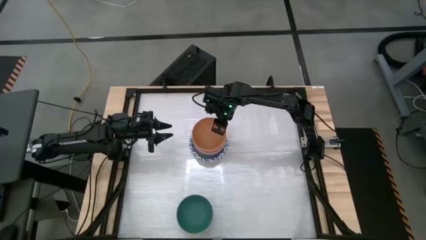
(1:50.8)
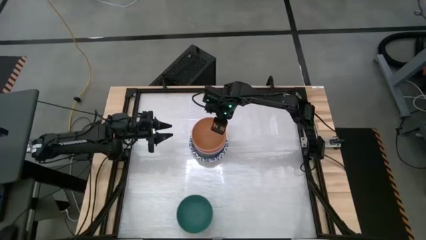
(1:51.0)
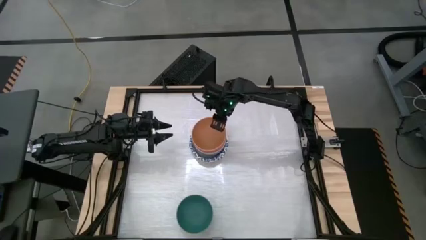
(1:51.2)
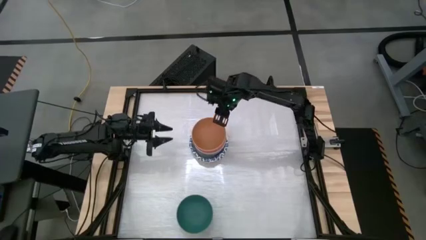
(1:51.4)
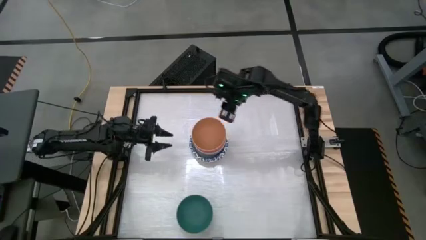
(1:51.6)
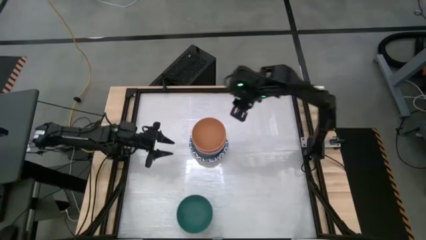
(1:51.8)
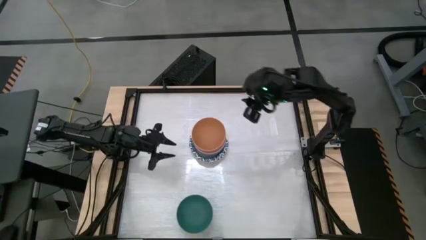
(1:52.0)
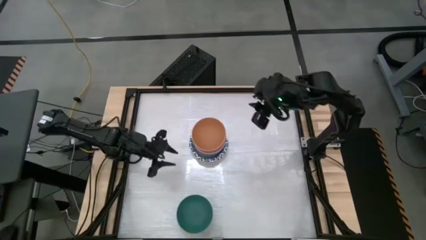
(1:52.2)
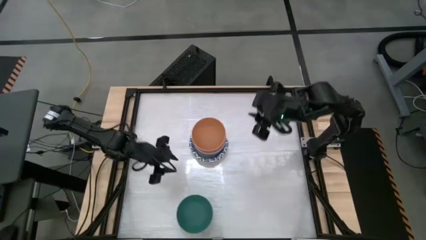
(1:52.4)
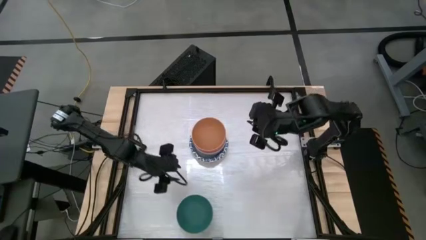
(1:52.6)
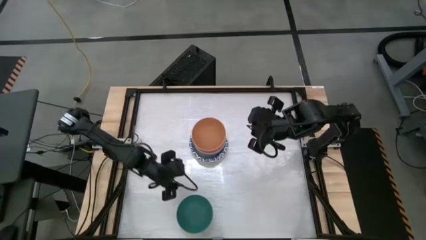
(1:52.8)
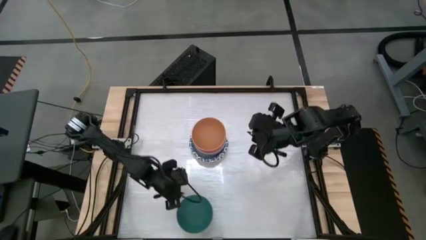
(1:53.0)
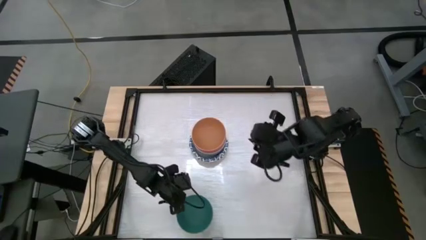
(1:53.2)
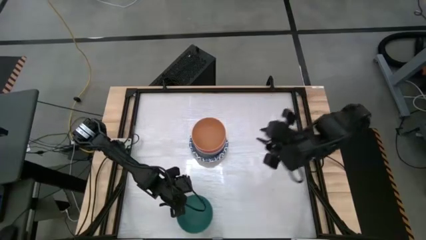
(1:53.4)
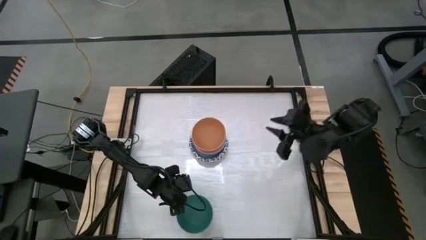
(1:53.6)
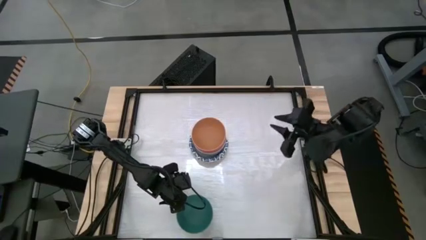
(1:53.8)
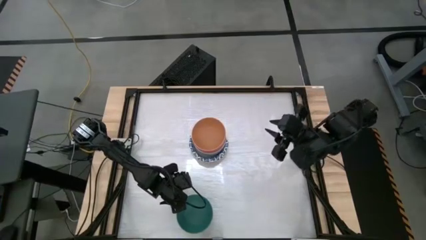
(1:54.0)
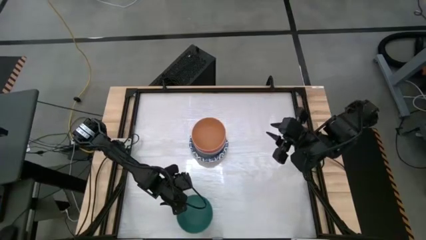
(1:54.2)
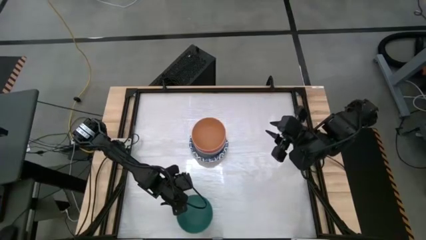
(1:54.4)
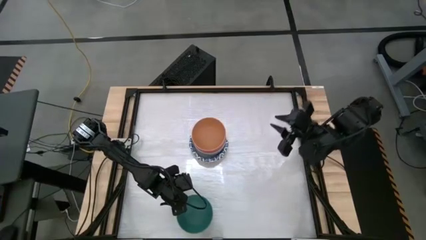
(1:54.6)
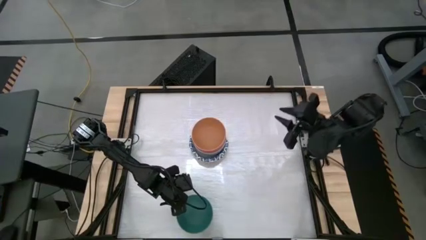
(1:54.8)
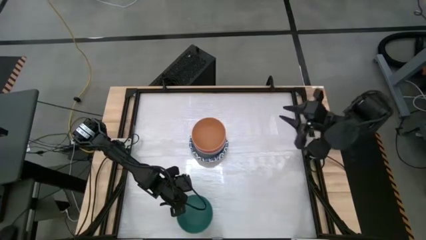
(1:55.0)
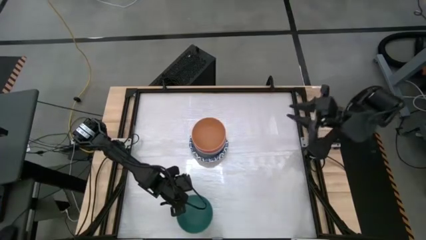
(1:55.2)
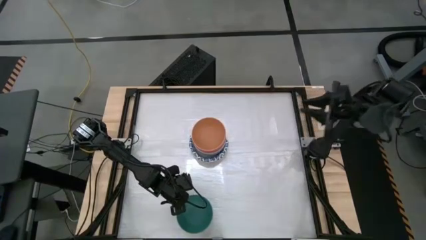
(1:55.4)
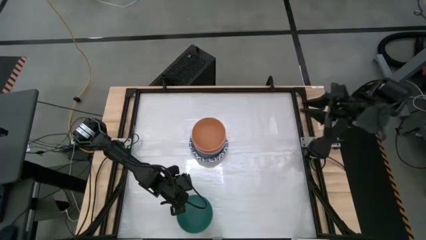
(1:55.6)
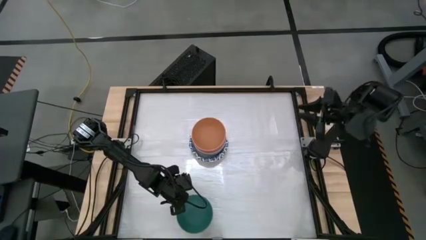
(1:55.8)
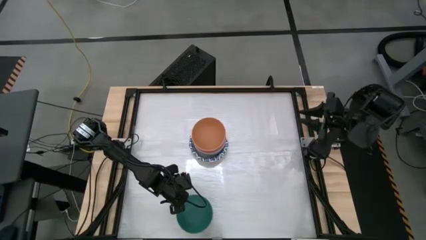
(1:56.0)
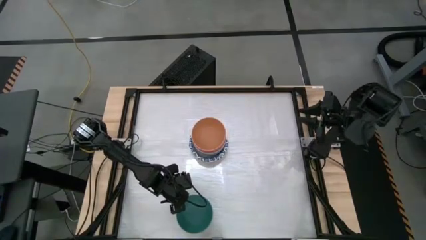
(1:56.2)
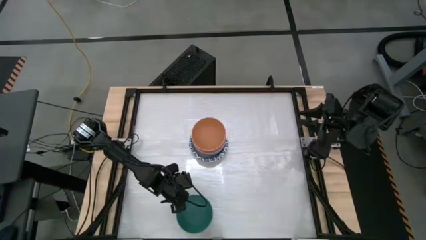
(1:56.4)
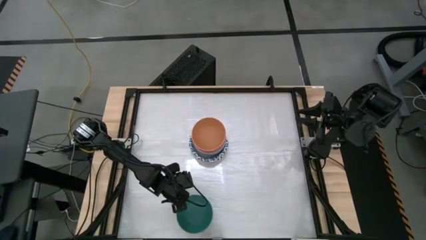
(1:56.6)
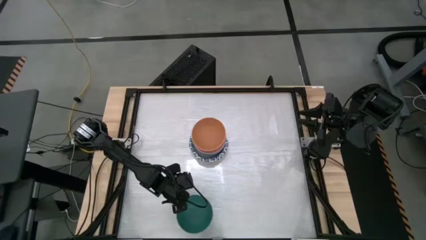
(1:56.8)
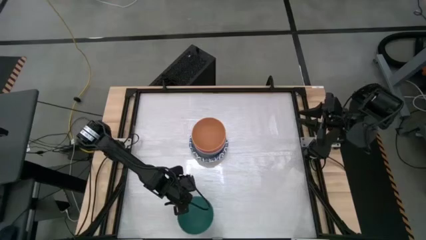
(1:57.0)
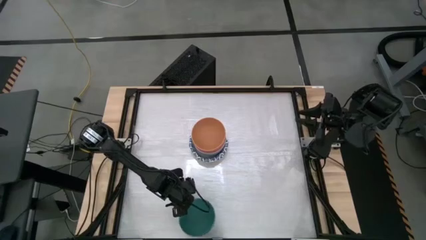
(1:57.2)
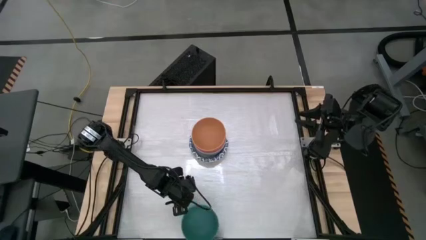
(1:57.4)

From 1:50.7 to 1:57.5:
Stack the green bowl on top of the orange bowl

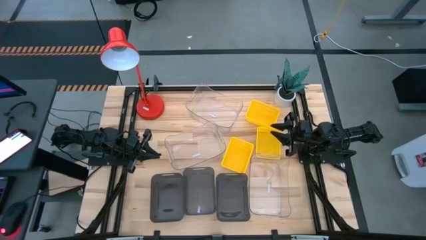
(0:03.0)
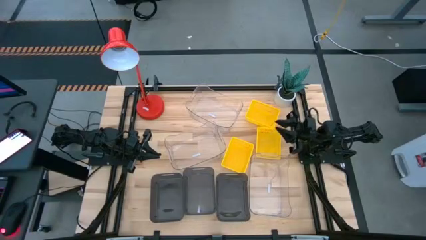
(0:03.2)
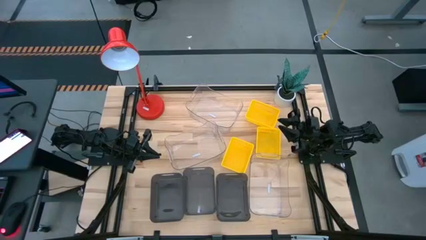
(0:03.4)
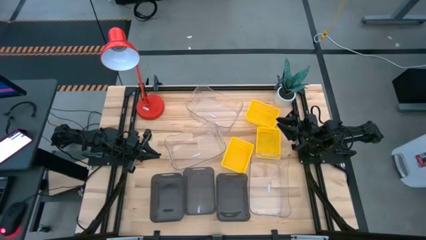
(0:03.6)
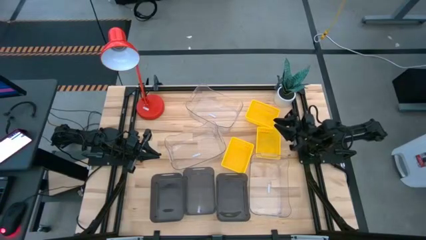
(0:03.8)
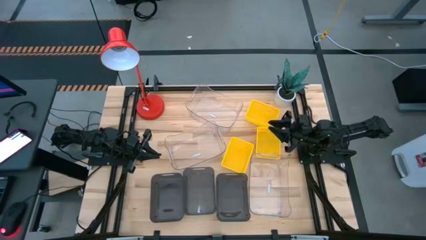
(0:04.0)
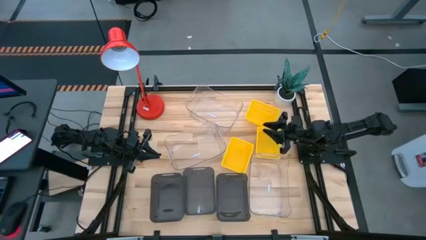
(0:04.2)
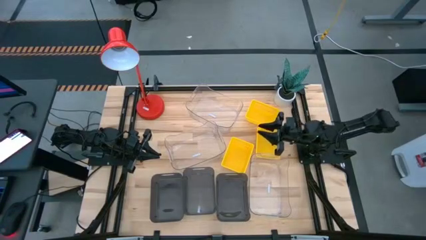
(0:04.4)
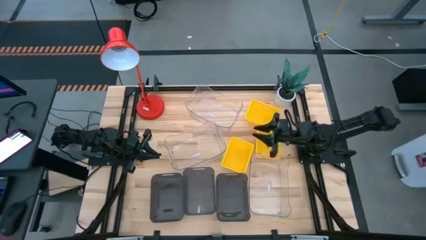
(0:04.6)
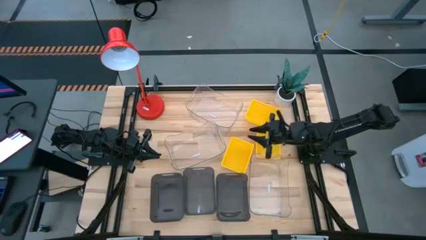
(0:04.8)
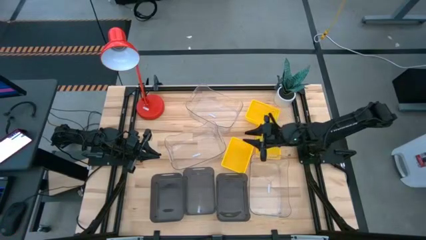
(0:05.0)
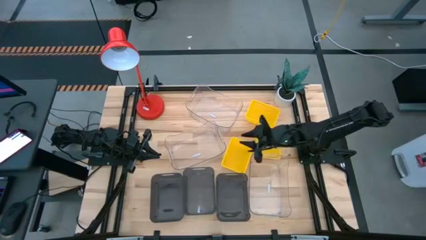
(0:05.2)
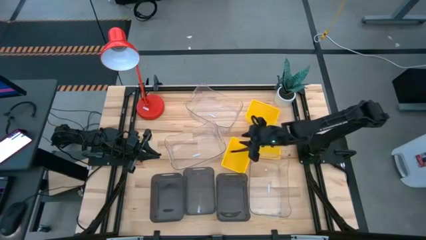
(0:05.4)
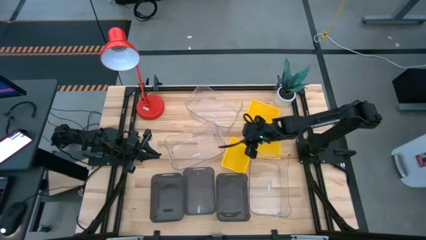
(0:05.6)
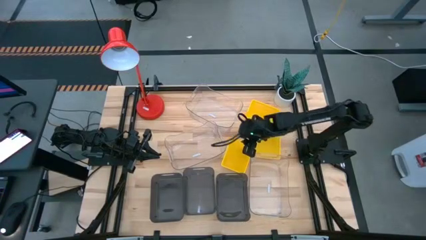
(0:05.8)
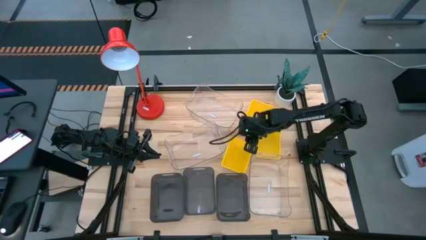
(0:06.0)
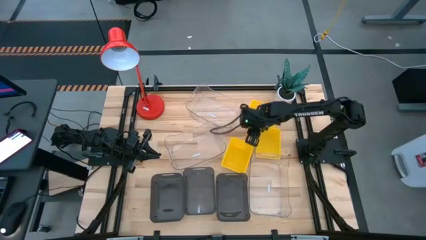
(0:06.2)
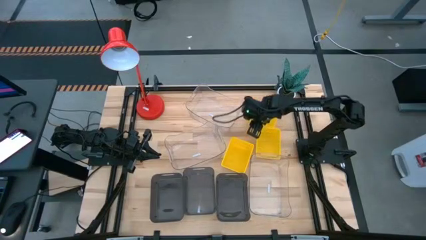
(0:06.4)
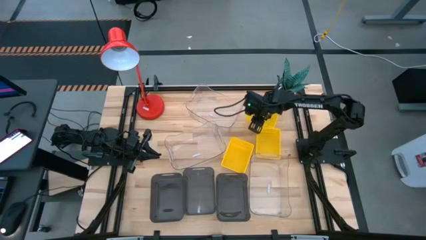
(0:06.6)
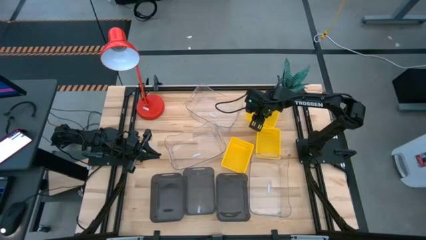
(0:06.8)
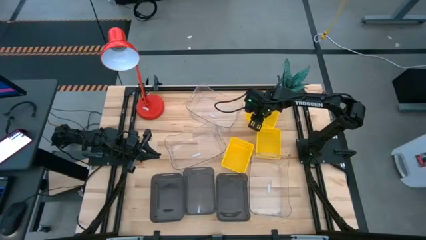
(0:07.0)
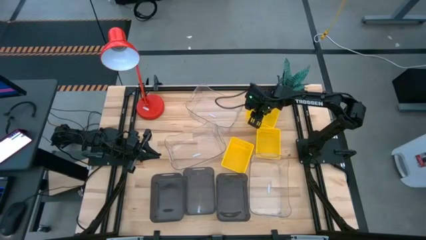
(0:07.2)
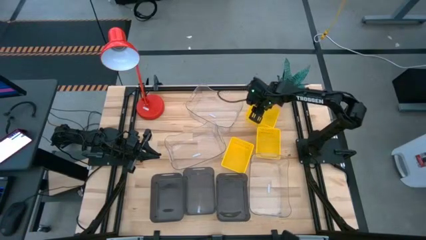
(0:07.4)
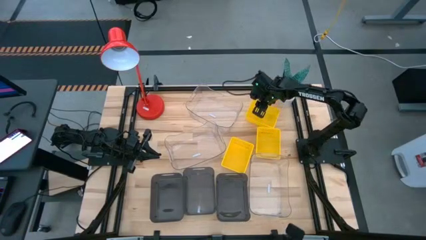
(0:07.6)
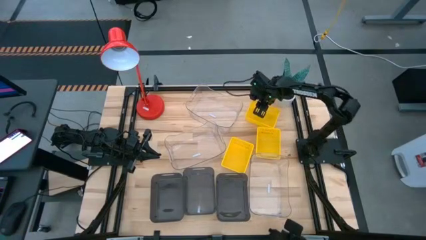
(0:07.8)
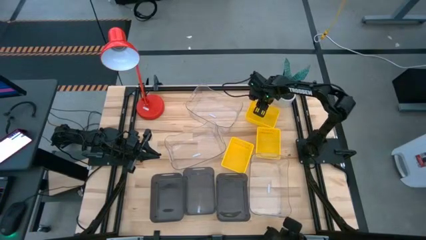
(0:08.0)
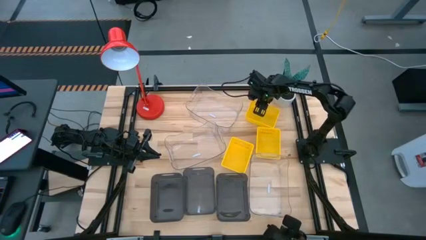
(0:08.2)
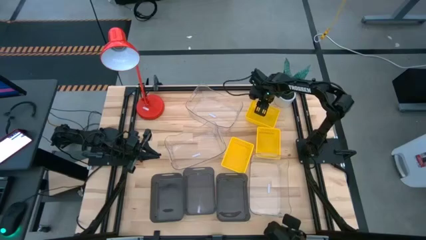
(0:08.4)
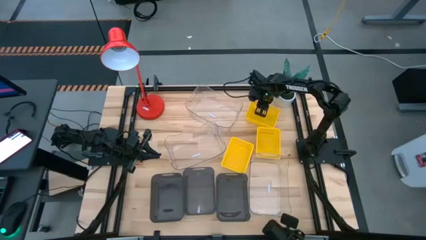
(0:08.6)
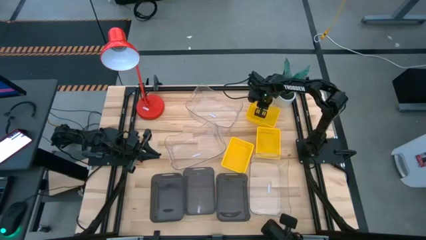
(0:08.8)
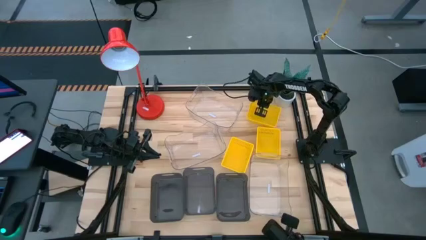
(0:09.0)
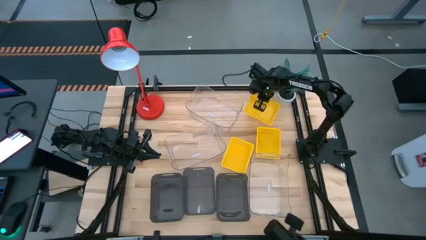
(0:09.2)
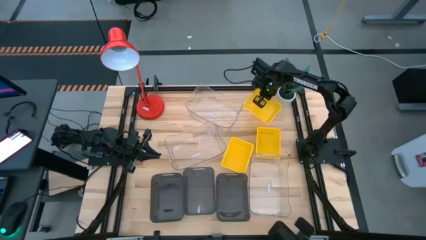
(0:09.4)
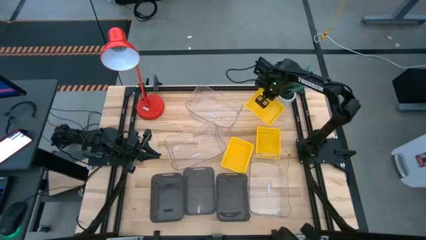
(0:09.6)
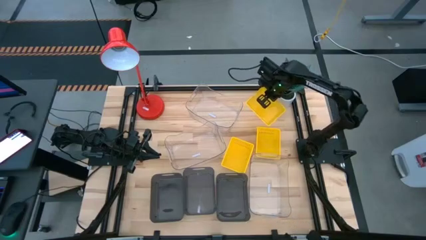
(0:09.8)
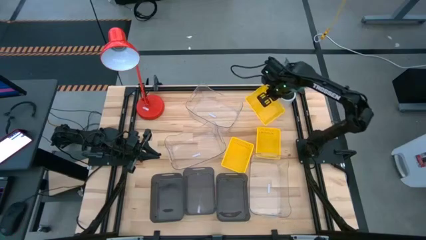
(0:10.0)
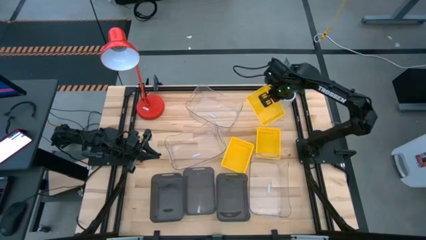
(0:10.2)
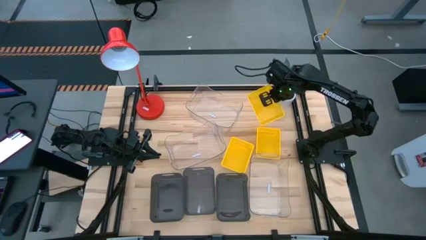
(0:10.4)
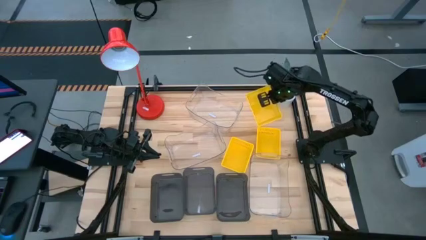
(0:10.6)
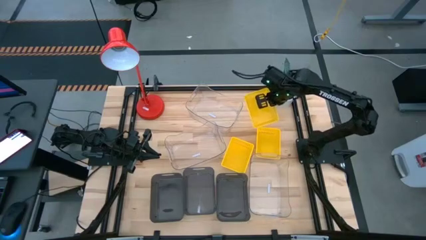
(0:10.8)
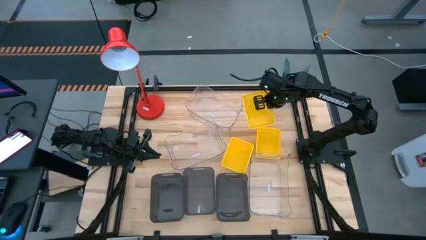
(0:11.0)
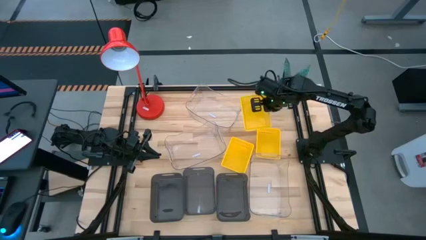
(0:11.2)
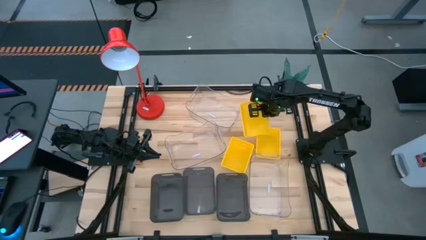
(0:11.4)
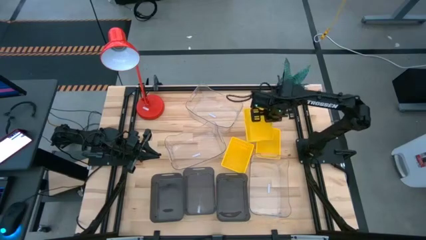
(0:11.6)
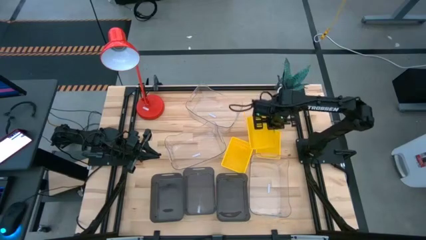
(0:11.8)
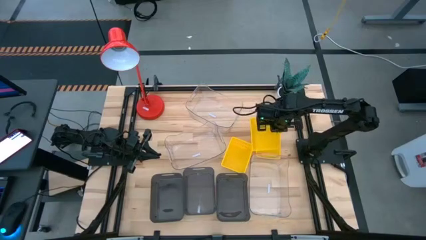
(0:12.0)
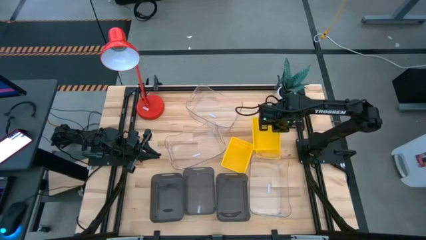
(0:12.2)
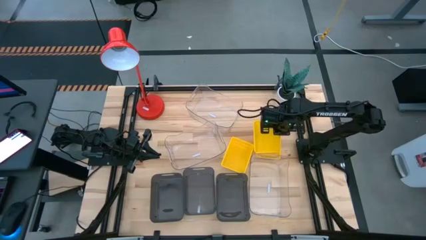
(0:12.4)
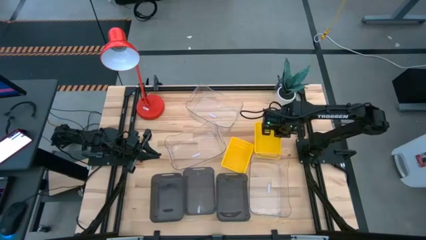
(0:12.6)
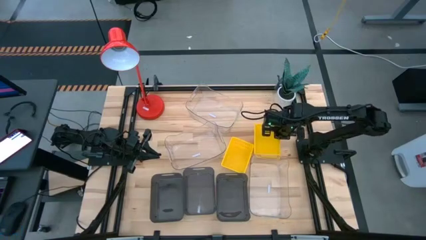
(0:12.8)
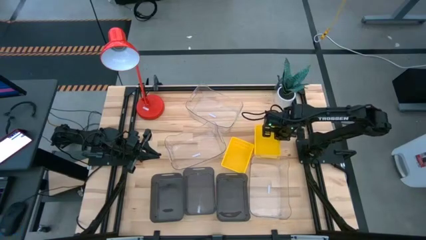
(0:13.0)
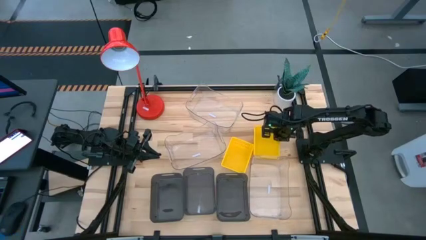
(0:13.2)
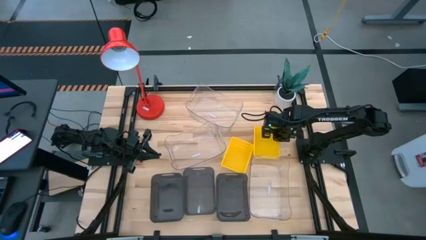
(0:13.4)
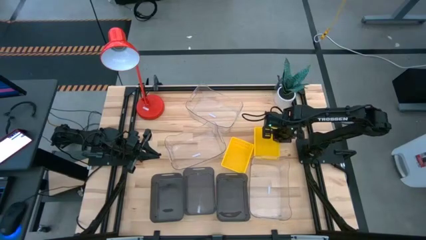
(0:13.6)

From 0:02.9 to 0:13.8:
Stack the top yellow bin on the bottom right yellow bin
